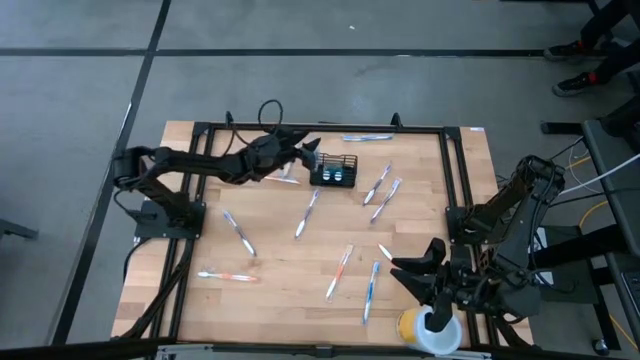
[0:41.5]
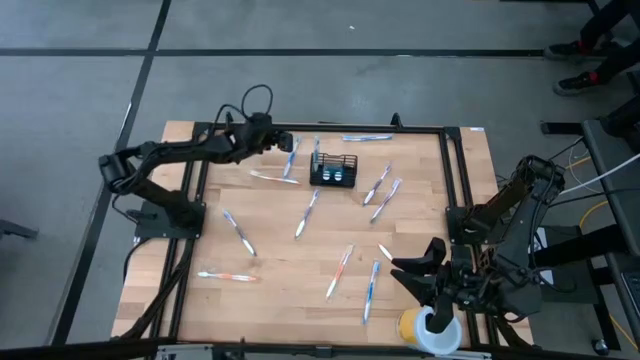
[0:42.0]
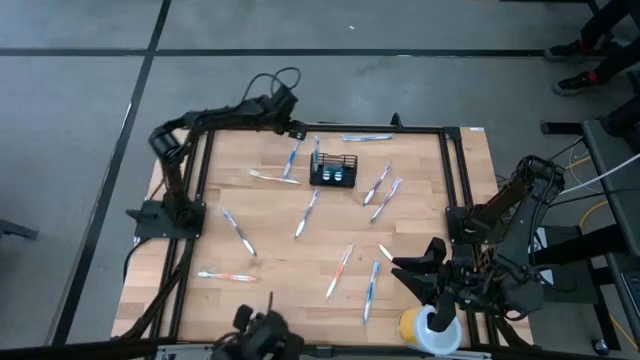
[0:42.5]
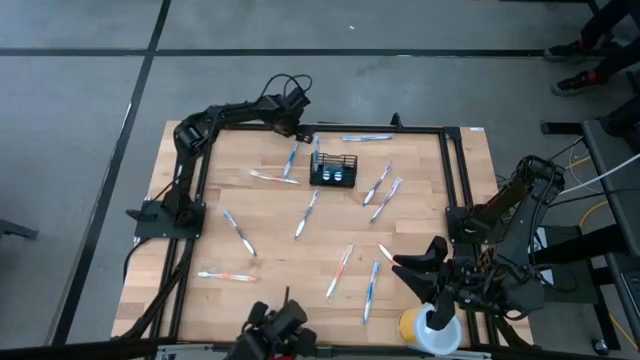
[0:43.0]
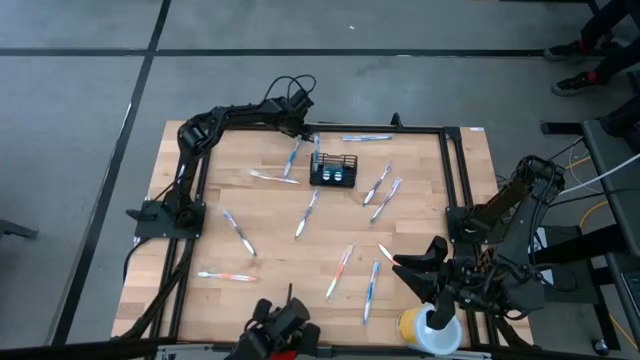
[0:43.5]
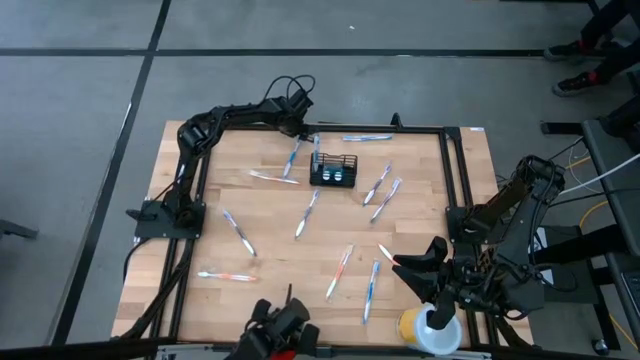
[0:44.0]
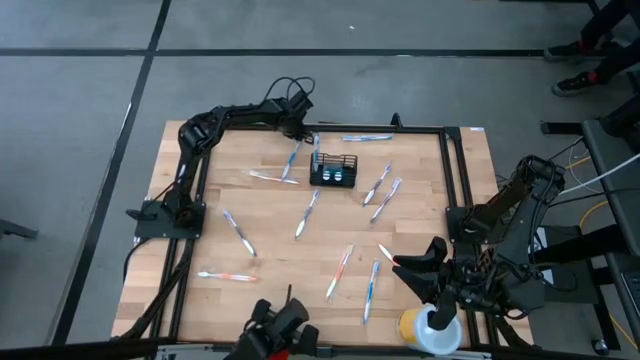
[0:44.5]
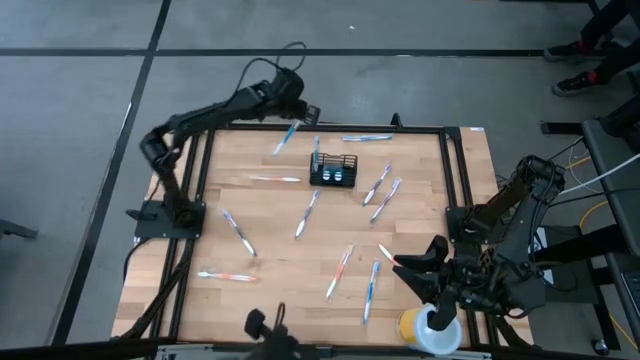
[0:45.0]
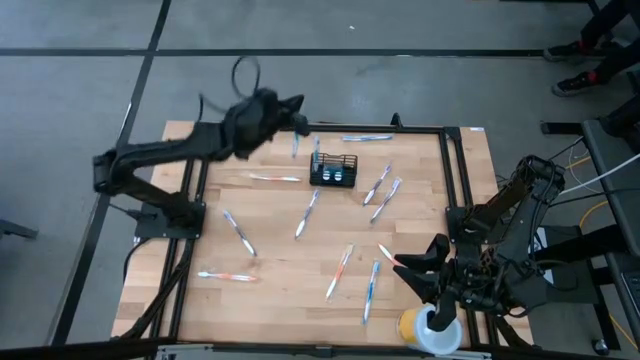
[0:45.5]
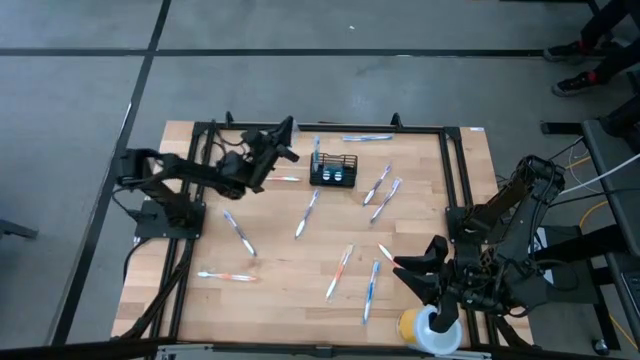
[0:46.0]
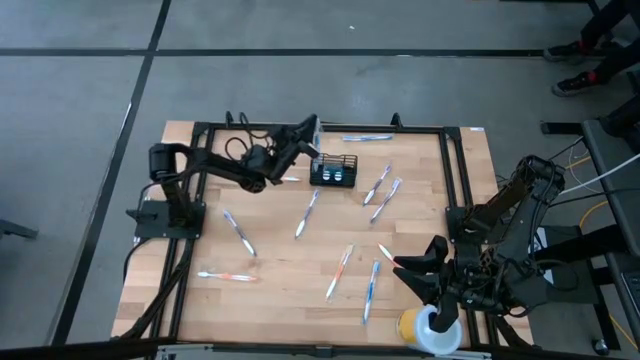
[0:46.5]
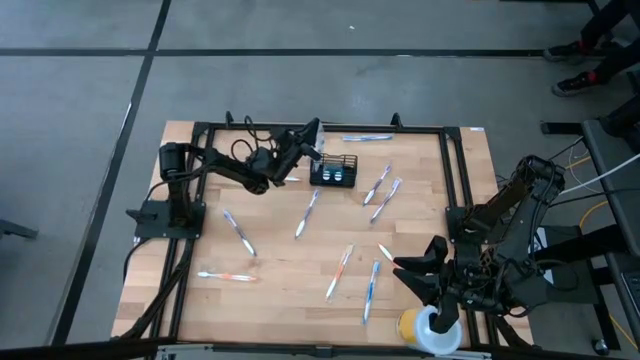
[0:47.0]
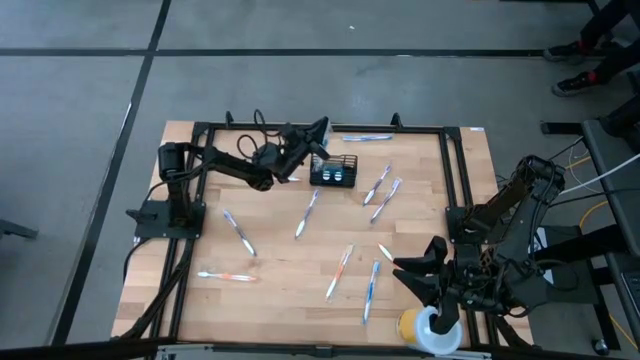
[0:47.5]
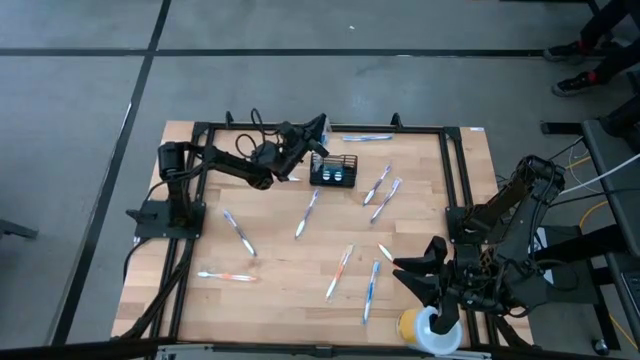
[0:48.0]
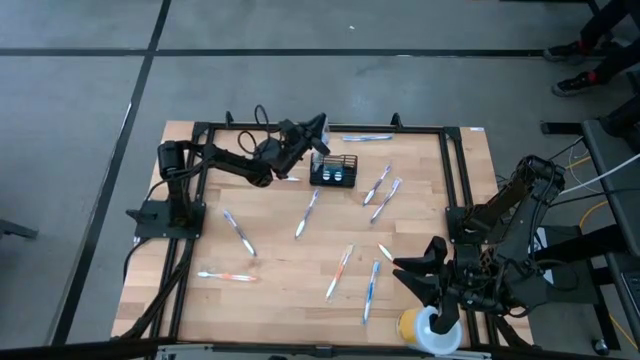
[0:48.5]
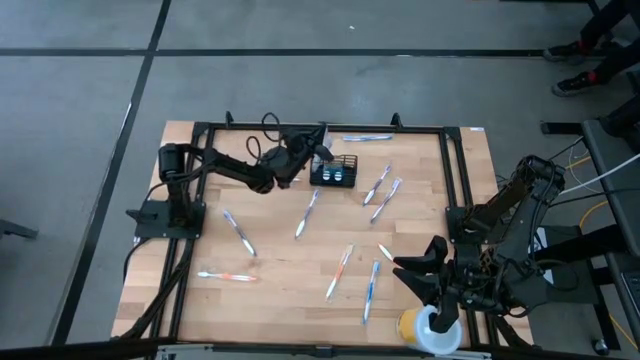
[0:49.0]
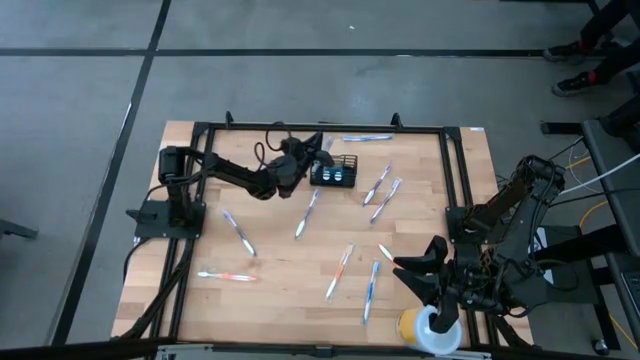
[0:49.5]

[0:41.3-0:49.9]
Task: Pick & Place toothbrushing station
Put the top left blue toothbrush into the left section of the mesh organizer

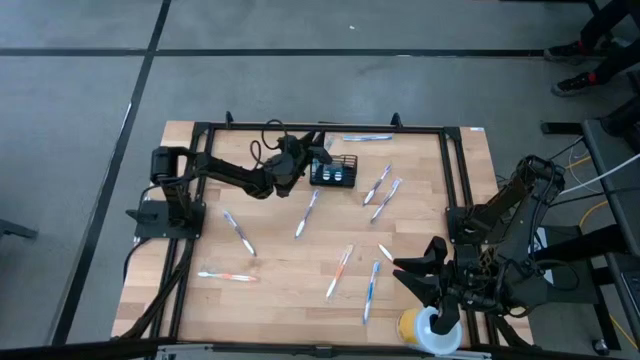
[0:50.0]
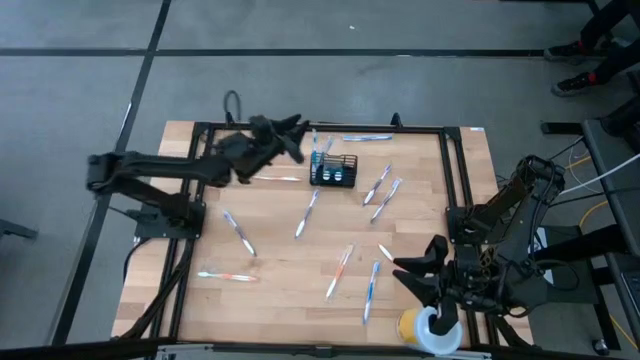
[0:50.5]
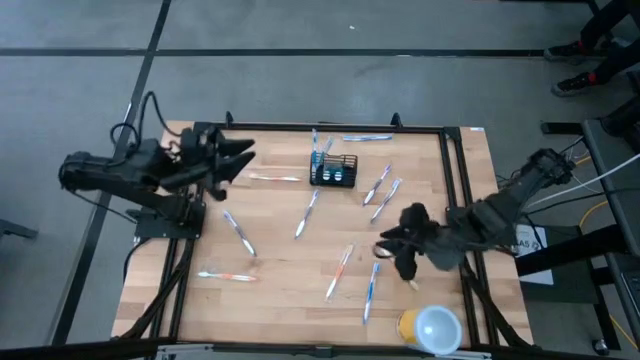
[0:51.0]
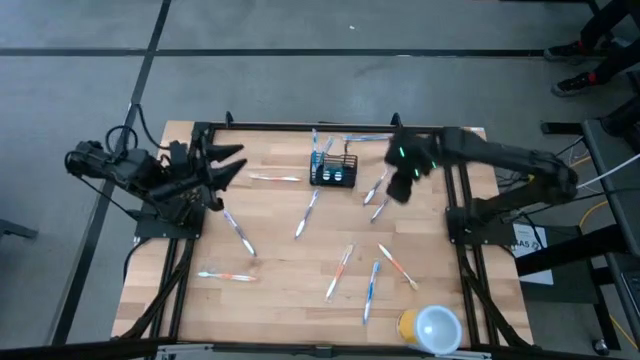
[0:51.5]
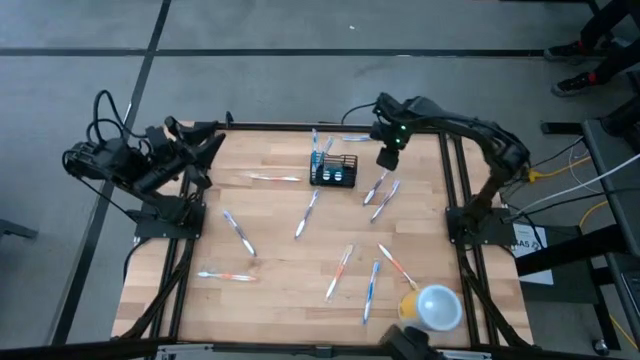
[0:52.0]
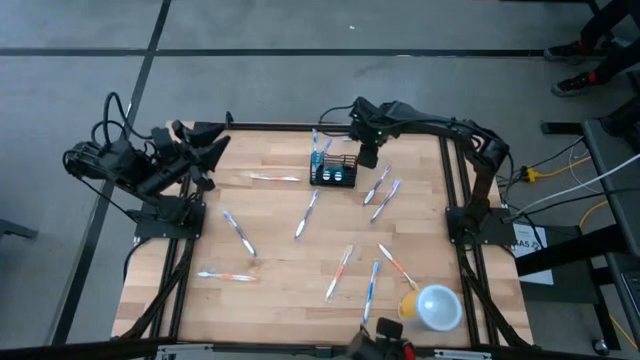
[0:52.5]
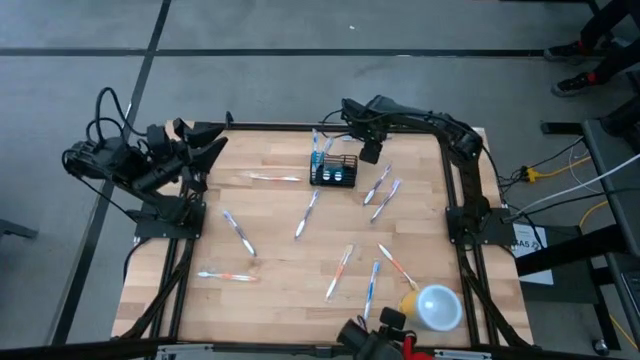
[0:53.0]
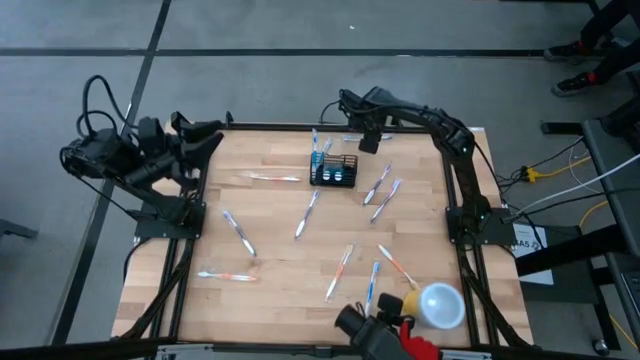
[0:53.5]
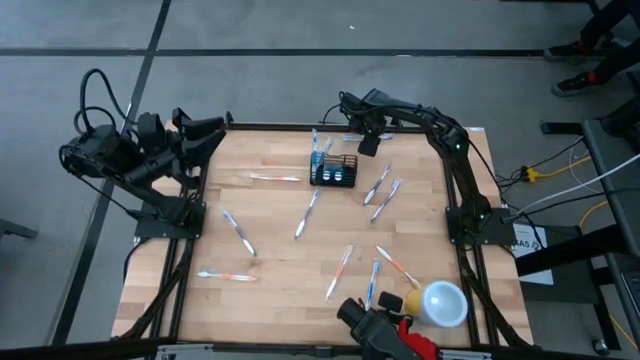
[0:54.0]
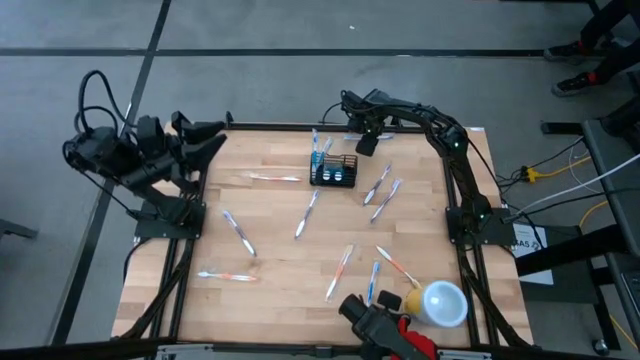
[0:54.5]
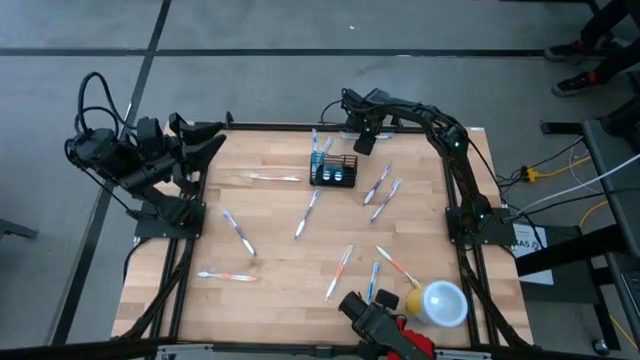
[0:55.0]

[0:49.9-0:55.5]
Put the top blue toothbrush into the left section of the mesh organizer

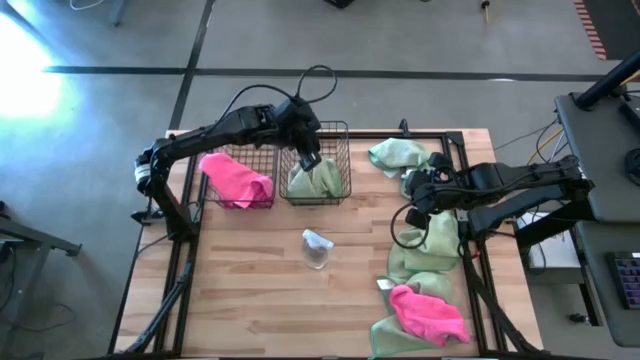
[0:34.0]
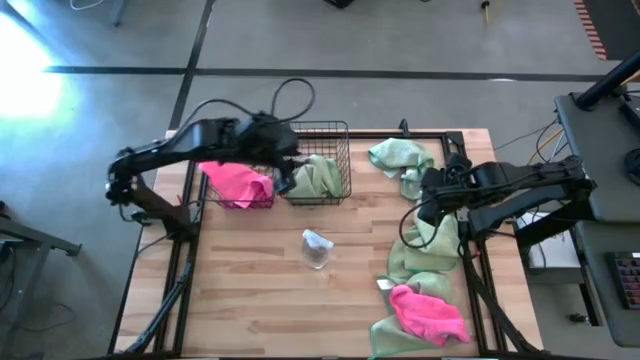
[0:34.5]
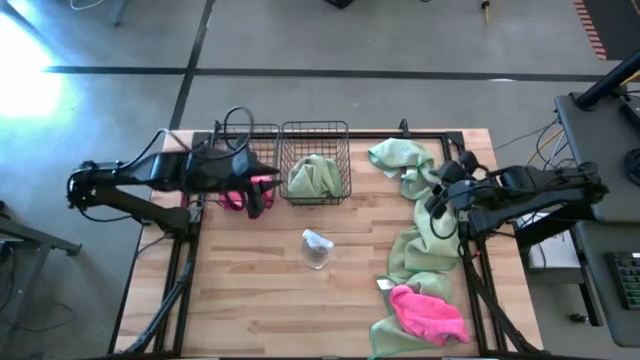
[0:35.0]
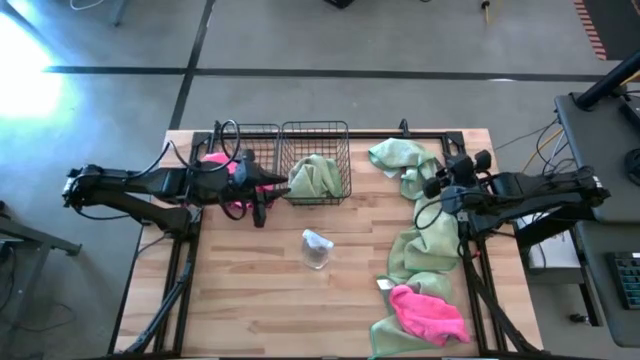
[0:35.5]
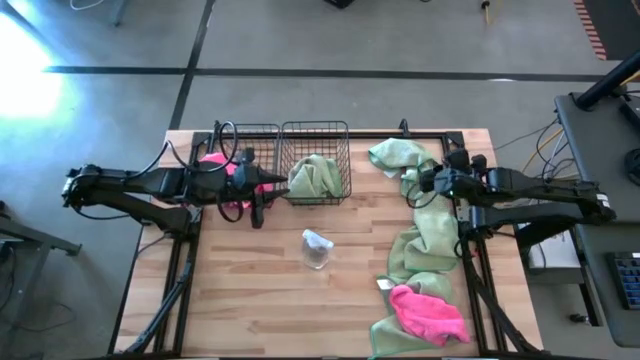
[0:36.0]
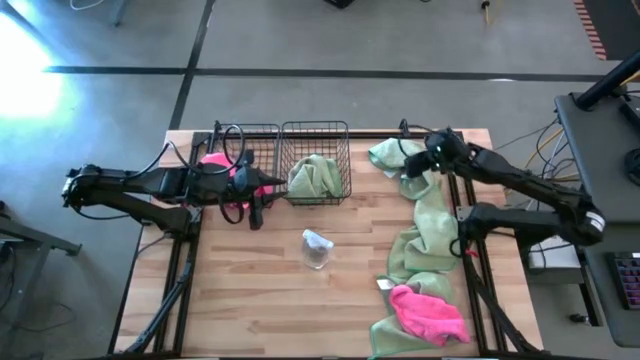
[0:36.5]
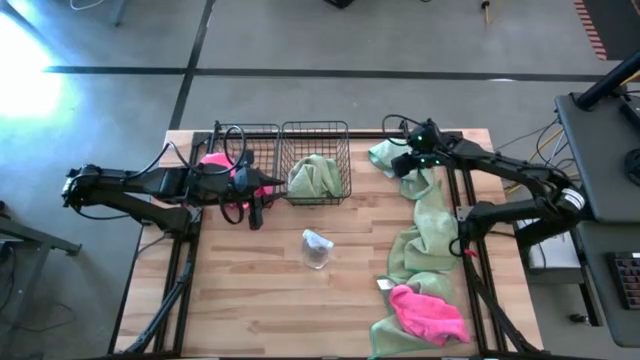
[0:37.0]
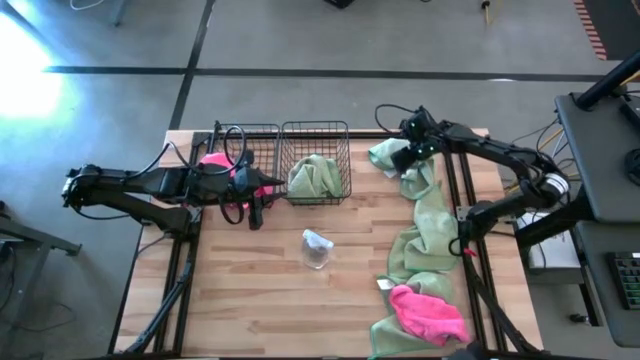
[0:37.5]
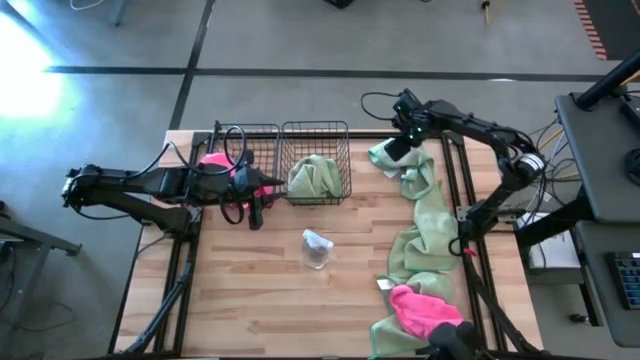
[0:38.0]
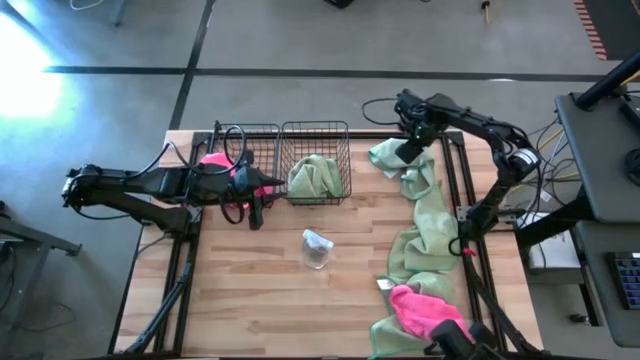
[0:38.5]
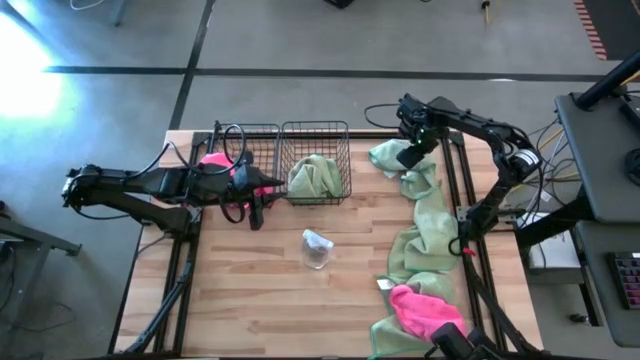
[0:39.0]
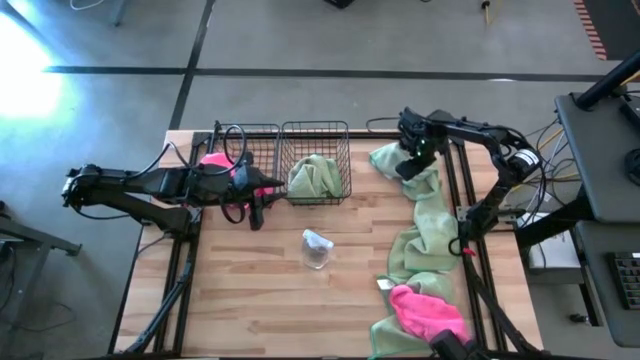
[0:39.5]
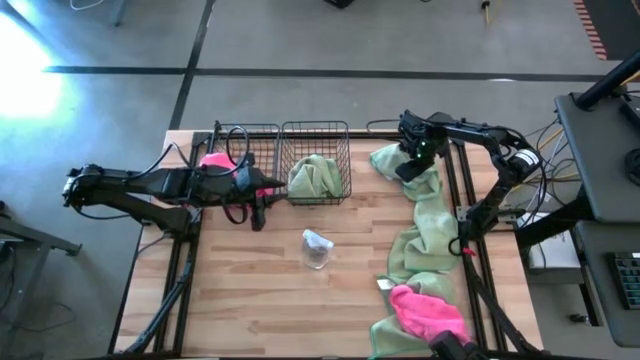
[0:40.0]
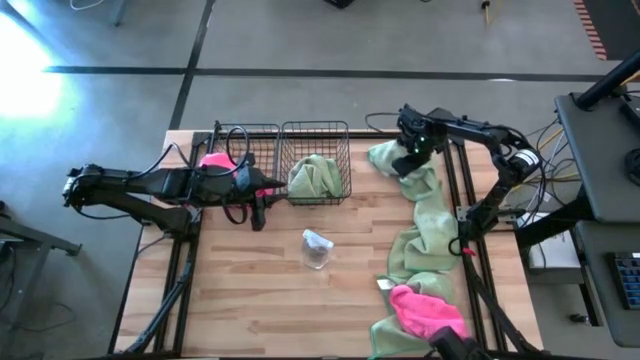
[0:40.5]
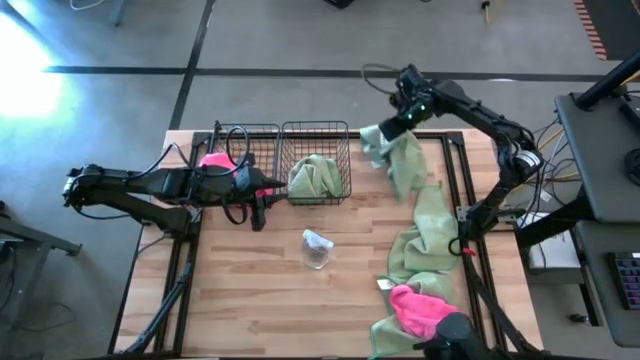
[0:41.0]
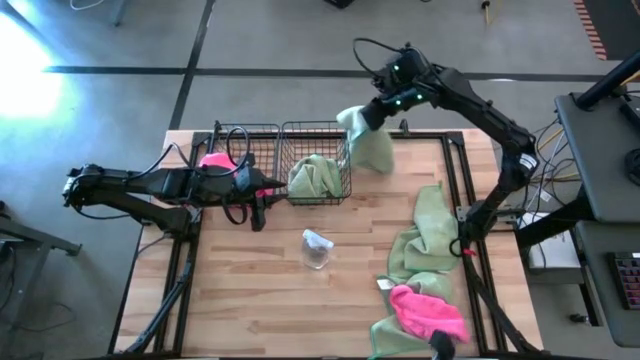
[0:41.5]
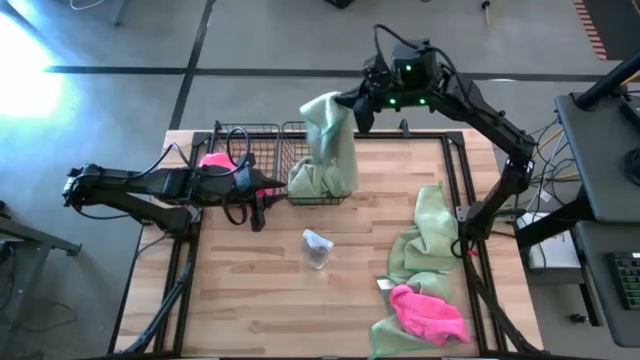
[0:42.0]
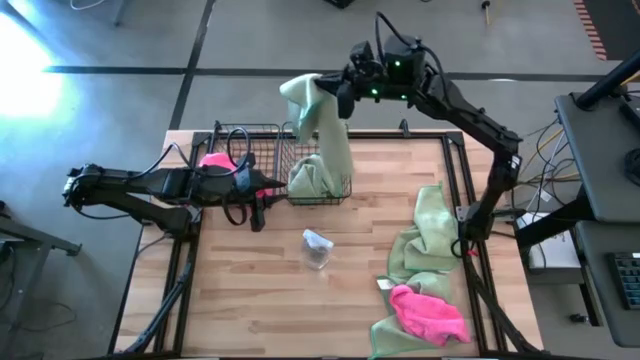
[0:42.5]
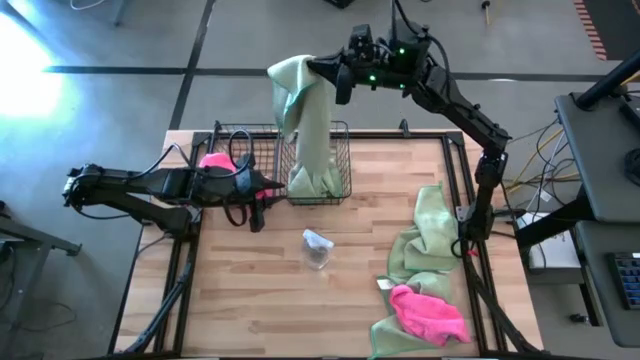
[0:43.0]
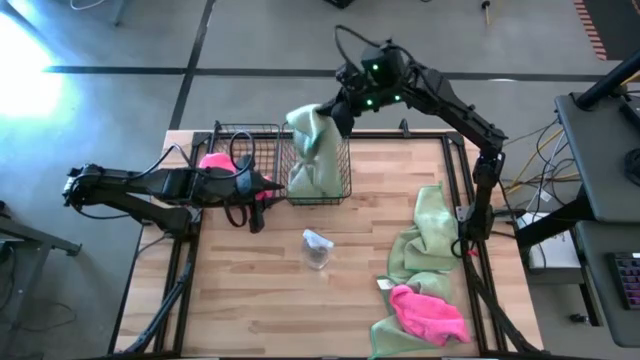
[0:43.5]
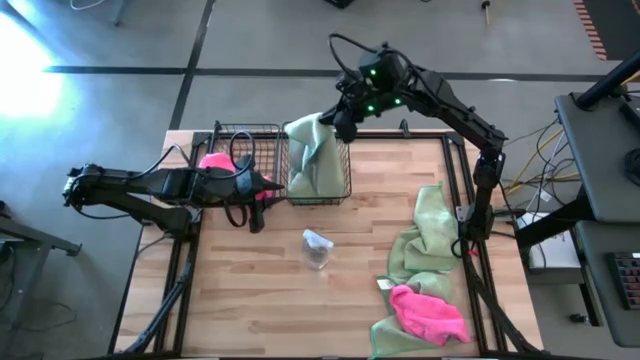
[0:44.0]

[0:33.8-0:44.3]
Task: Sort microfiber towel by color & place in baskets
Put the top green microfiber towel into the right black wire basket
